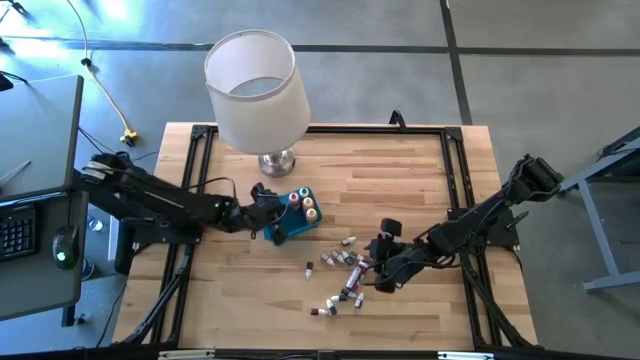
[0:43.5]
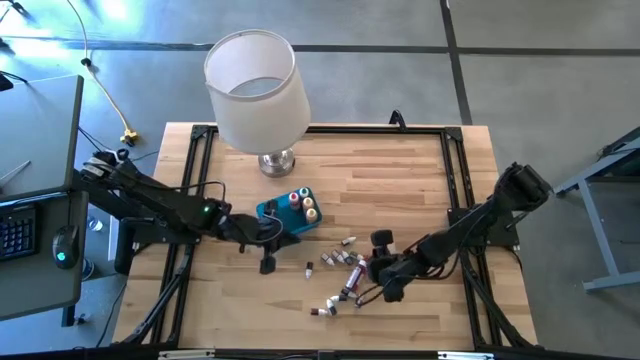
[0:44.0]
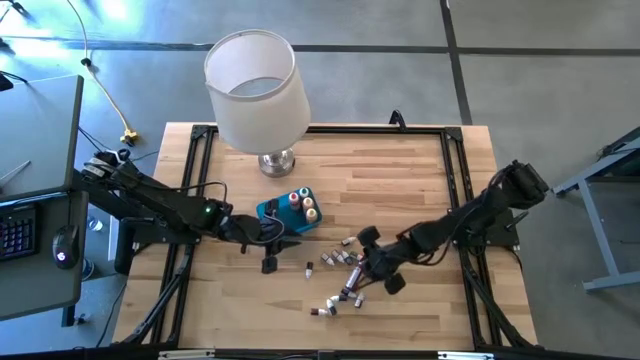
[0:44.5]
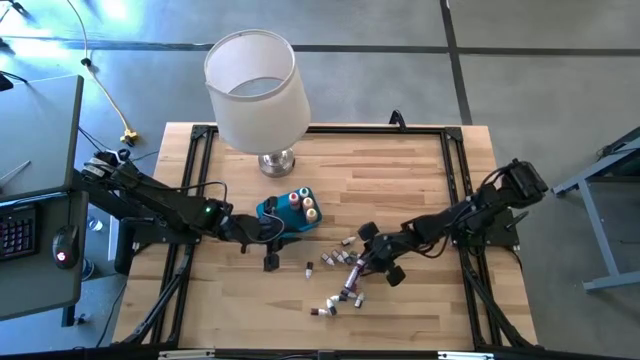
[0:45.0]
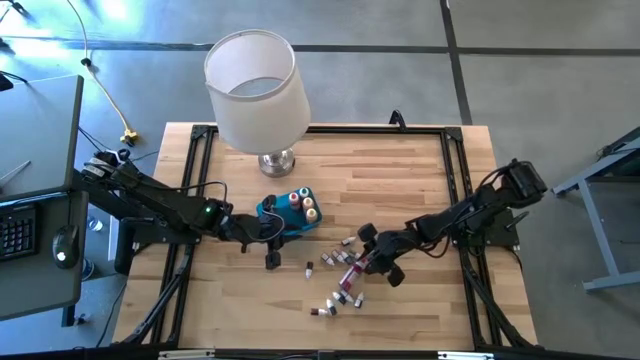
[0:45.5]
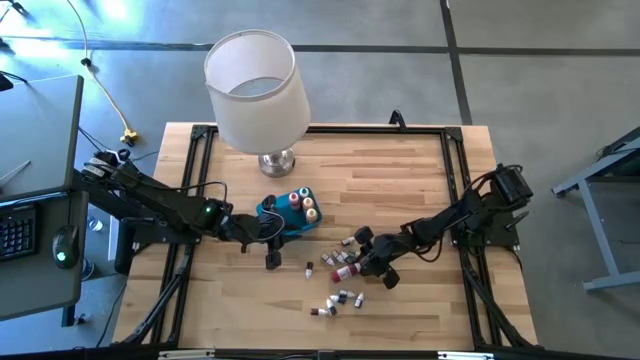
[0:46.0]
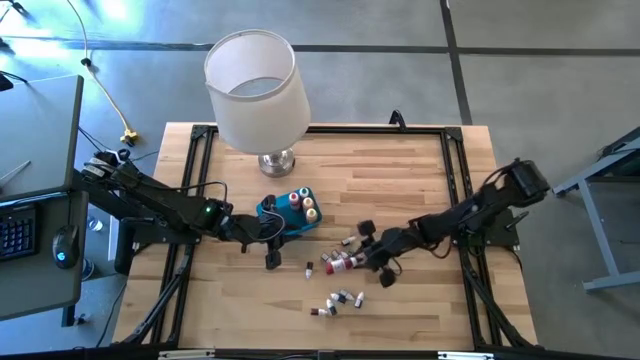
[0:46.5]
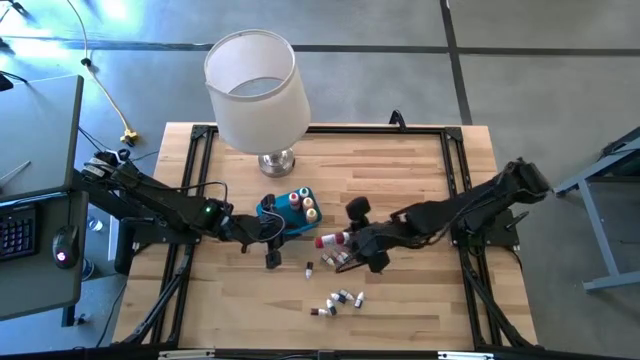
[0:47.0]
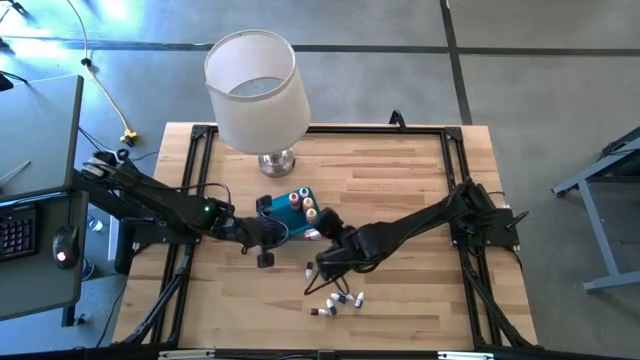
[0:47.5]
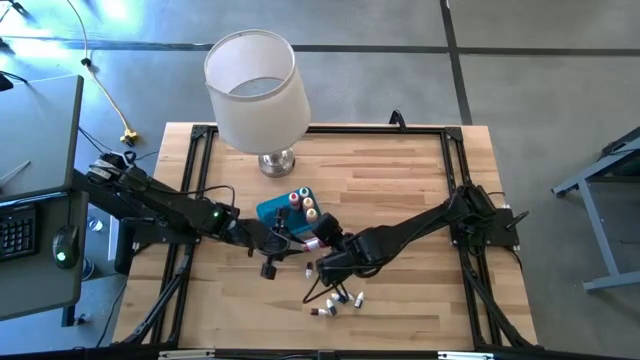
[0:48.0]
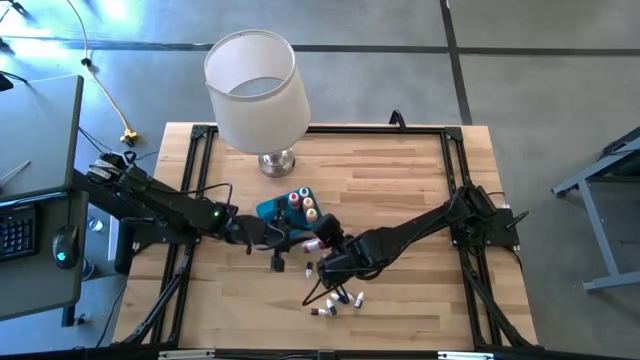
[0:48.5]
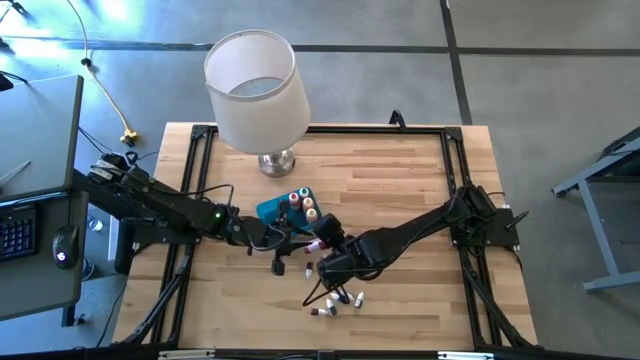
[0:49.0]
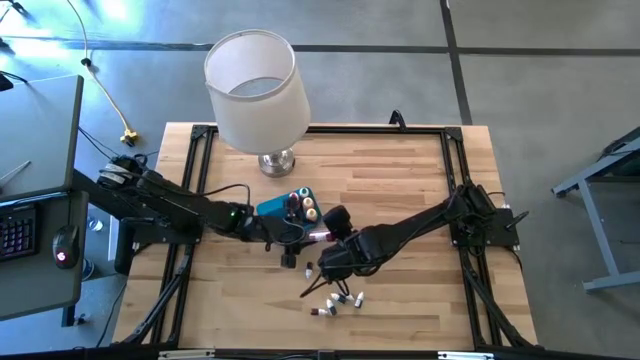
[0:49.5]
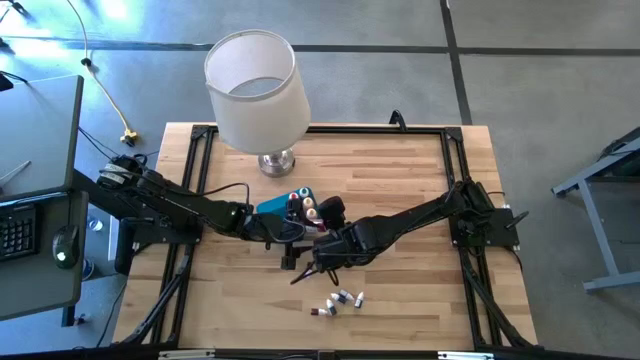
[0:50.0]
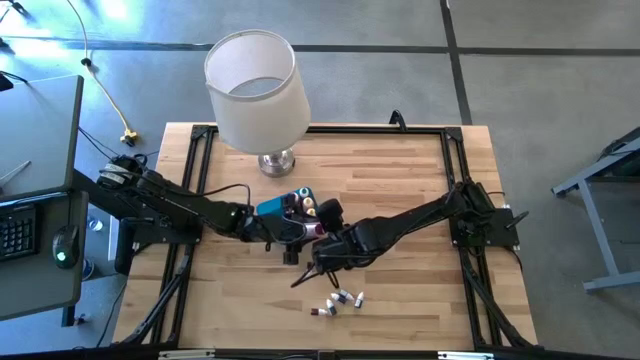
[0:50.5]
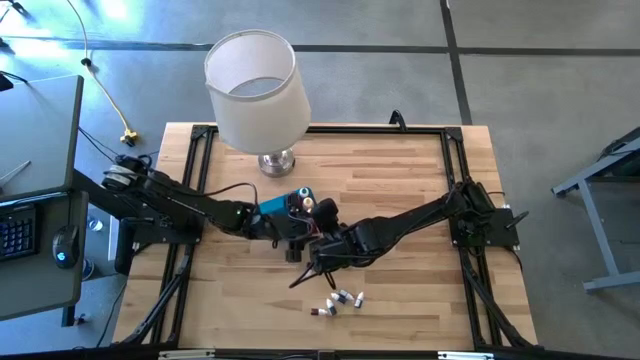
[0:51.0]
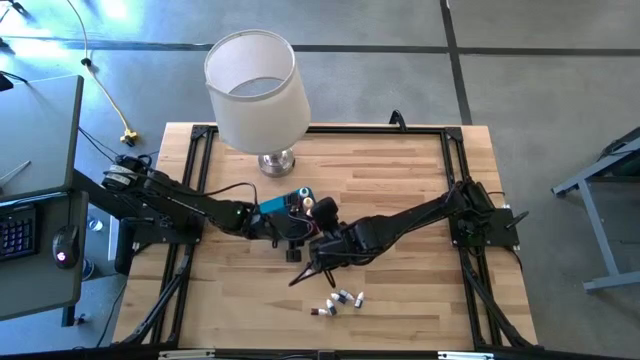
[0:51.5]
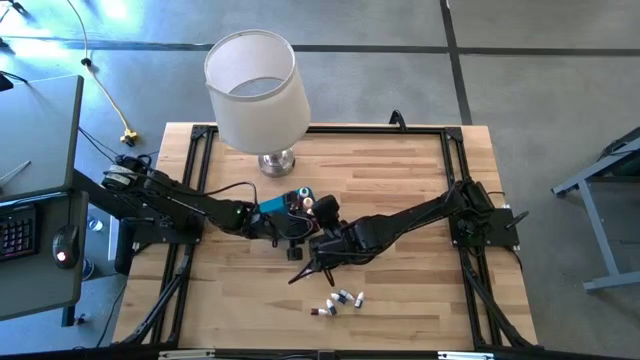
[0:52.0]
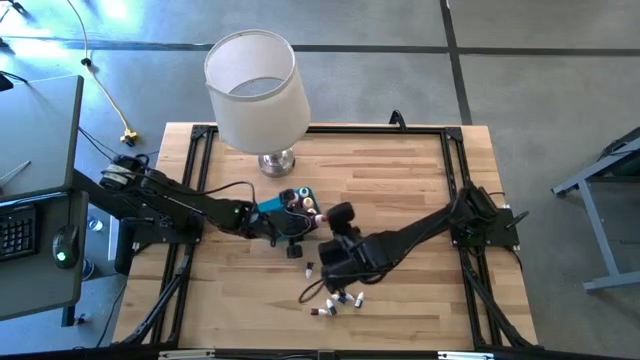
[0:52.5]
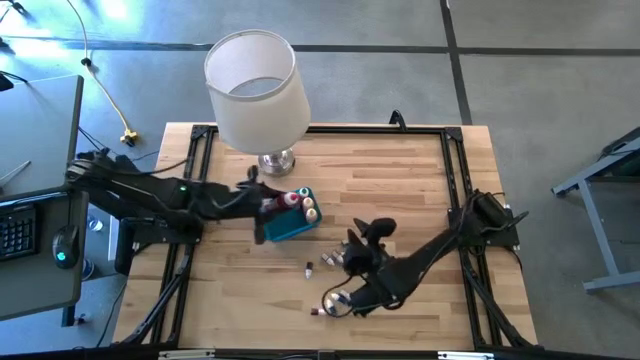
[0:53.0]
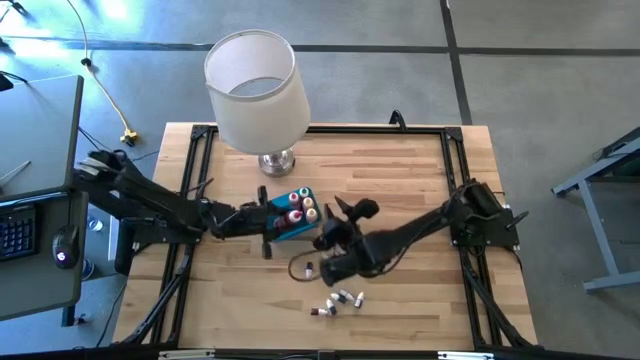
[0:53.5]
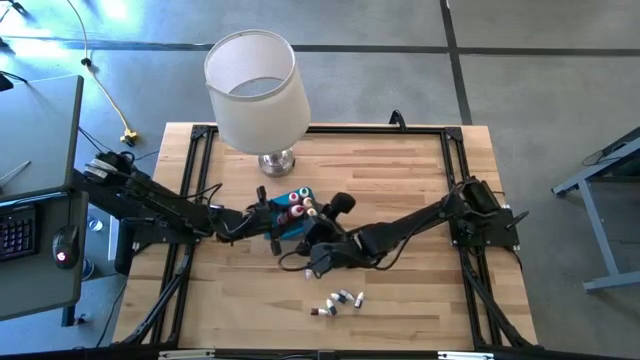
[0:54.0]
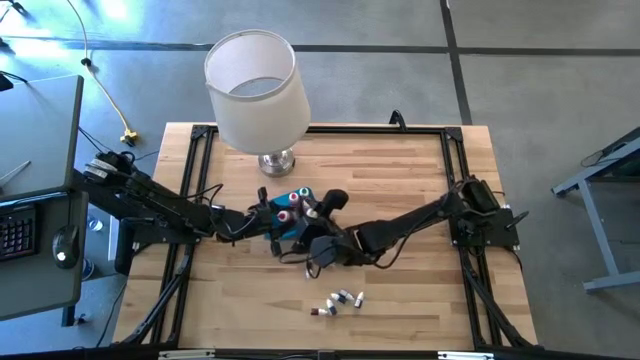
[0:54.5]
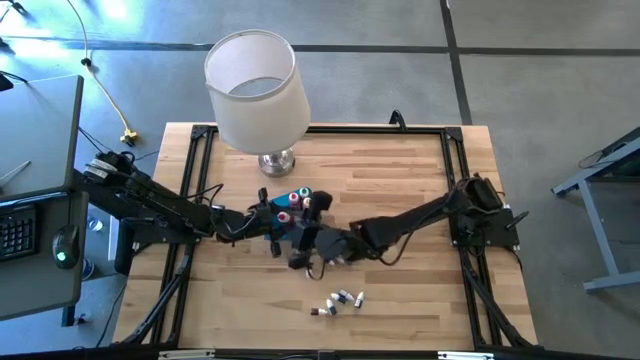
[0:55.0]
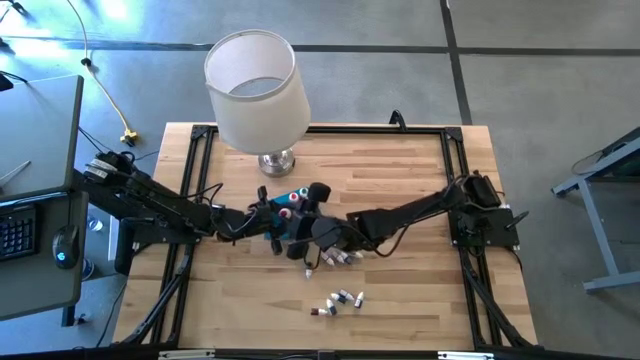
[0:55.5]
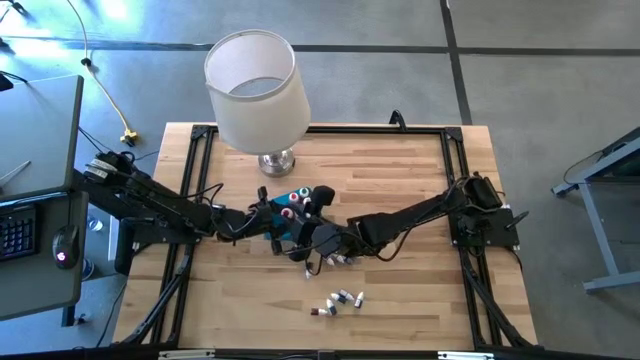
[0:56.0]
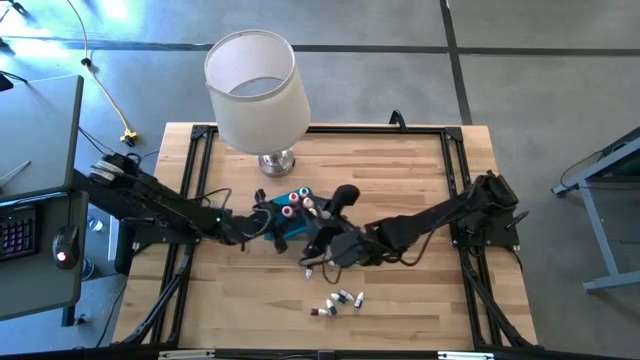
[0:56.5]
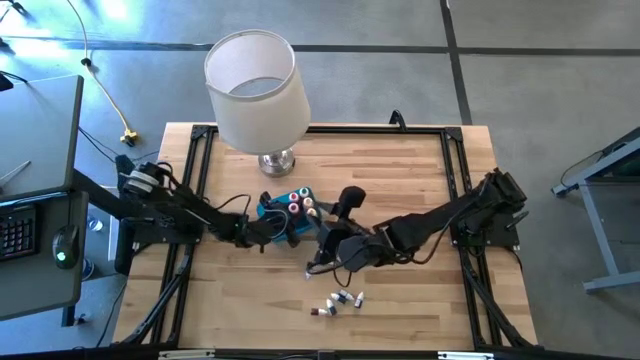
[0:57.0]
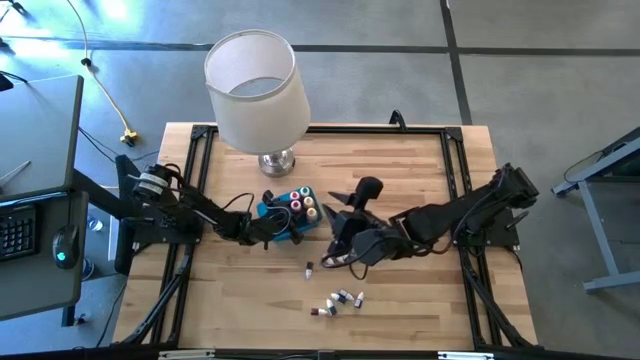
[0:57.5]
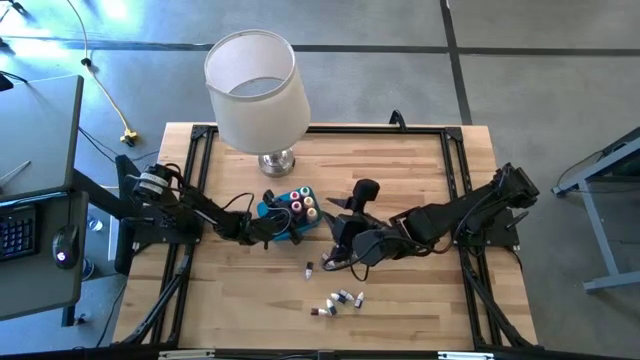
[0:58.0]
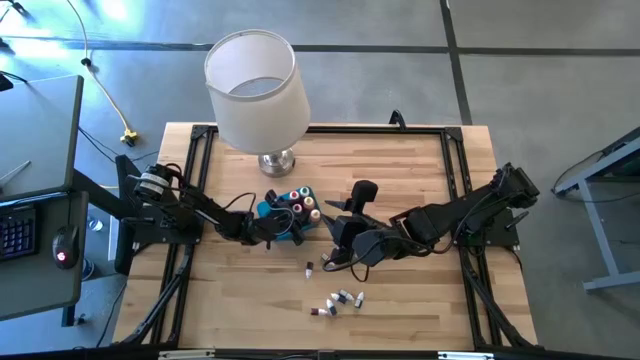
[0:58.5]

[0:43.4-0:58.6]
Task: Pick & Place food coloring
Put the large red food coloring bottle into the blue bin

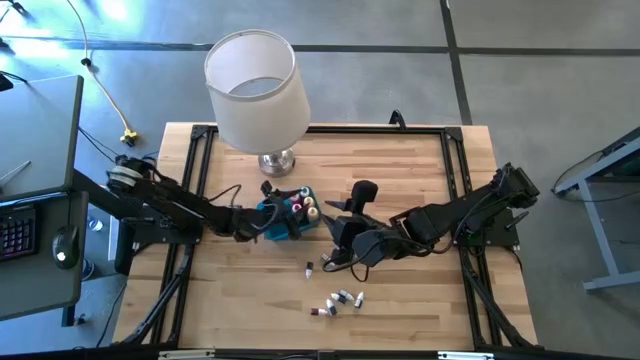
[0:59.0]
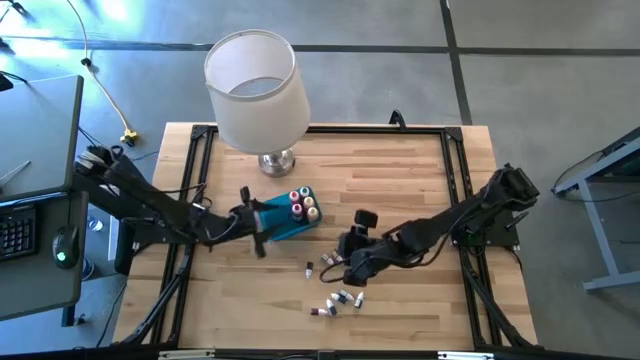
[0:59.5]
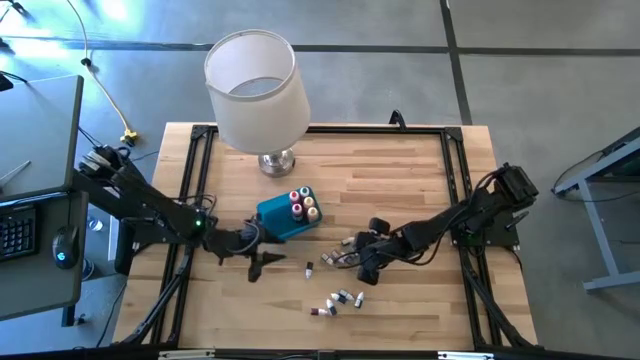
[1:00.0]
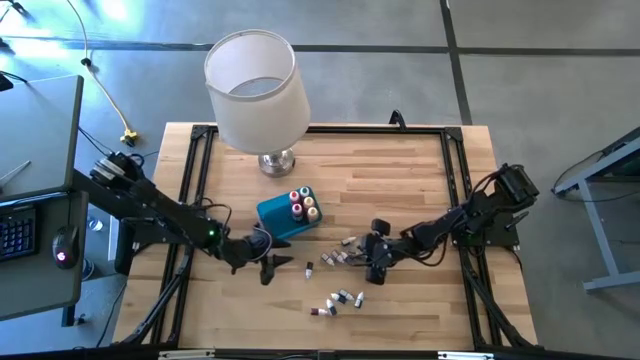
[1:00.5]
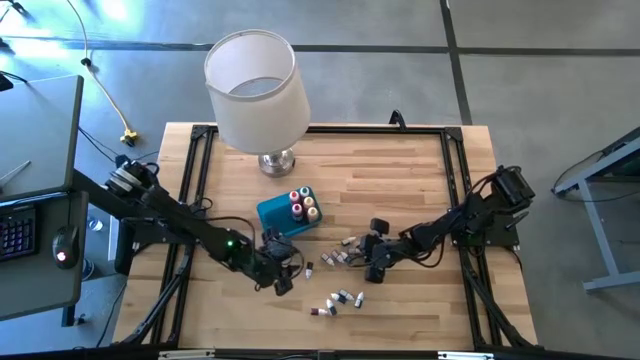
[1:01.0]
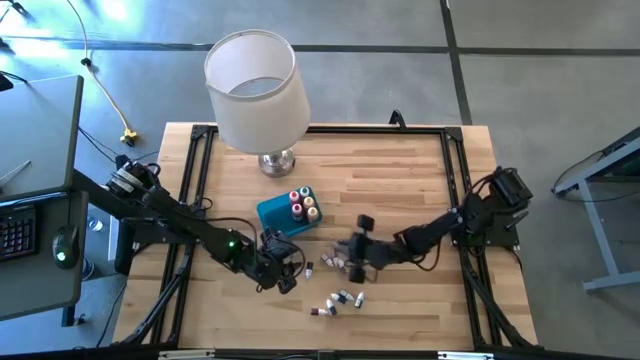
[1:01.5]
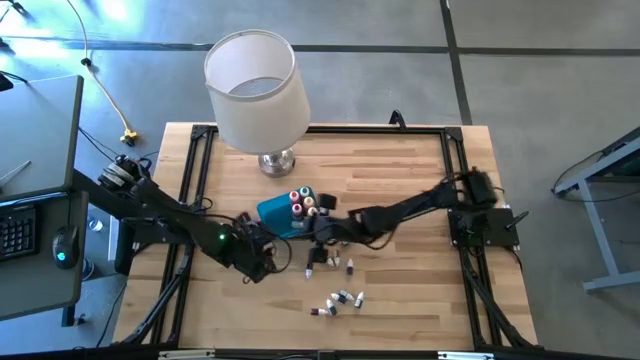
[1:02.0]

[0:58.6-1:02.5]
Put the small green food coloring bottle into the blue bin

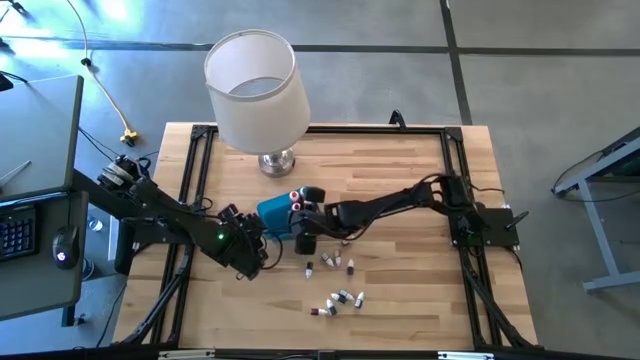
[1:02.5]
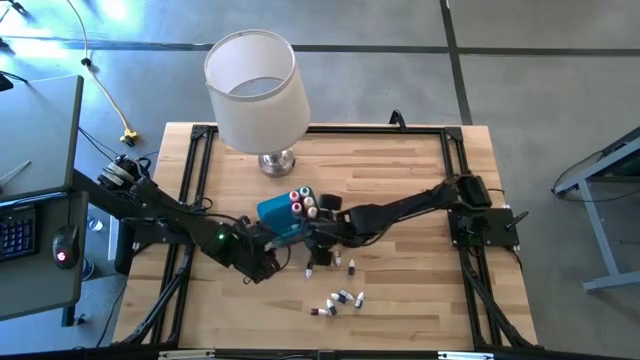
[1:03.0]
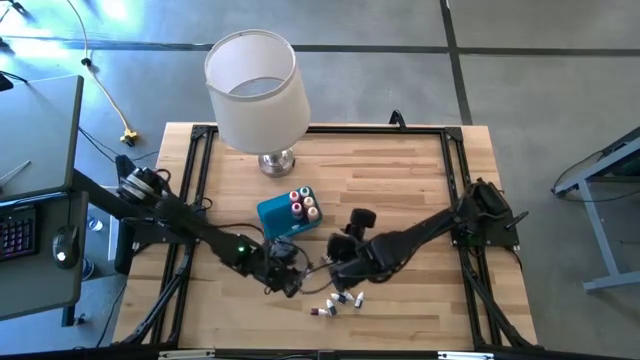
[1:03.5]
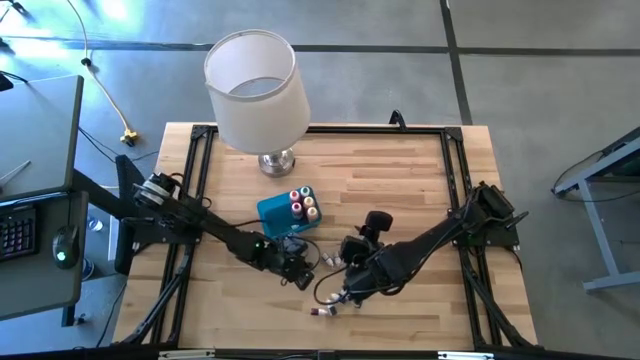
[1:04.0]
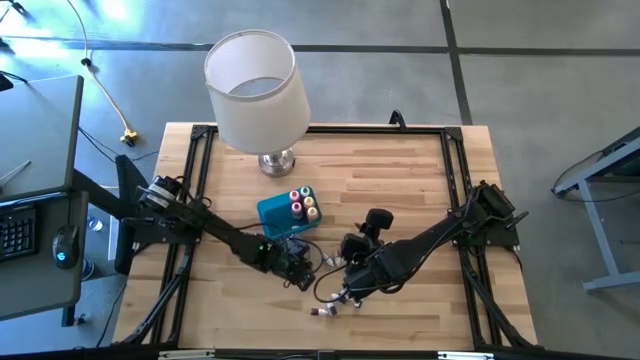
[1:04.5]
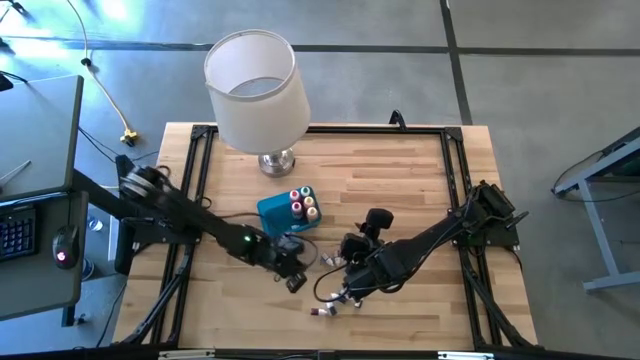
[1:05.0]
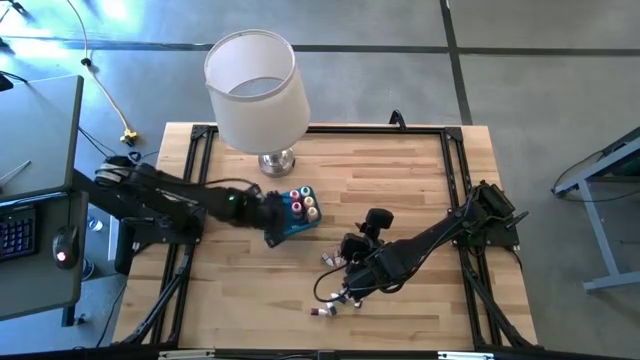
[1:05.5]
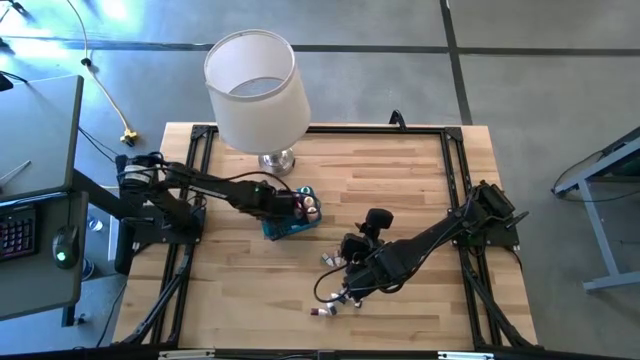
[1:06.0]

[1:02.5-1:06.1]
Put the small black food coloring bottle into the blue bin
